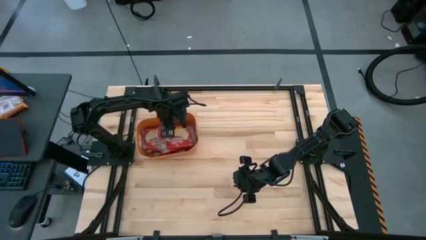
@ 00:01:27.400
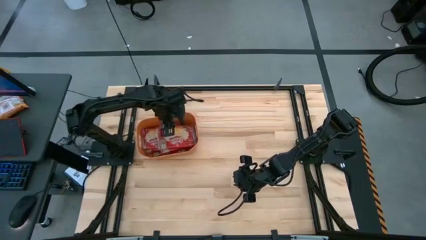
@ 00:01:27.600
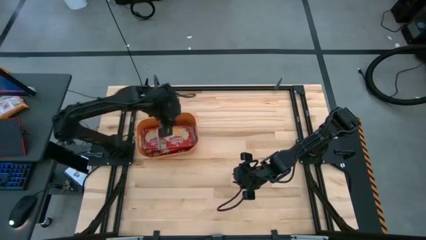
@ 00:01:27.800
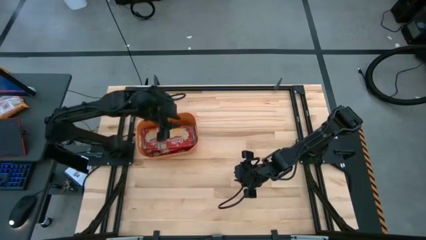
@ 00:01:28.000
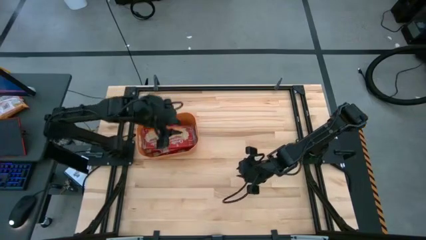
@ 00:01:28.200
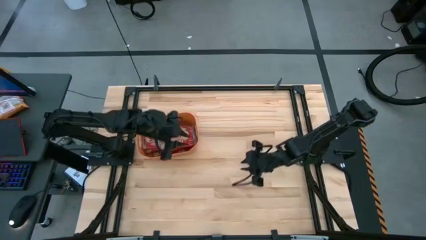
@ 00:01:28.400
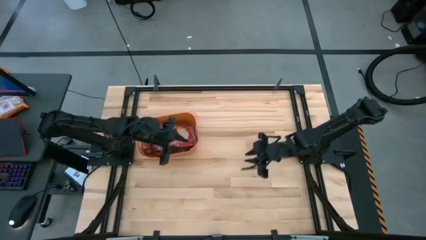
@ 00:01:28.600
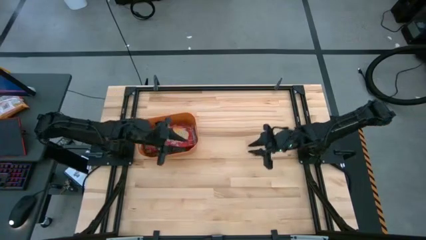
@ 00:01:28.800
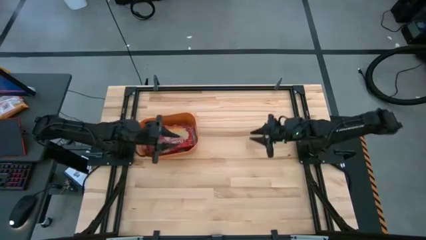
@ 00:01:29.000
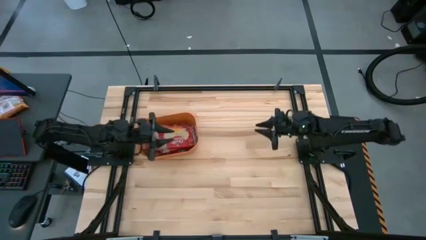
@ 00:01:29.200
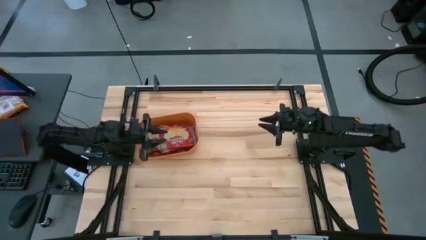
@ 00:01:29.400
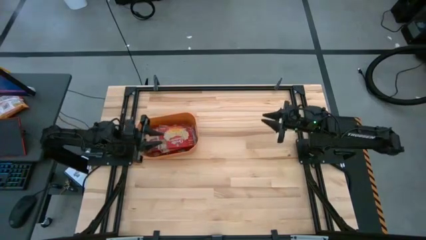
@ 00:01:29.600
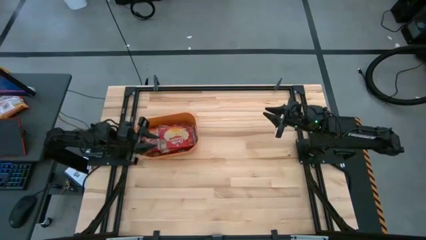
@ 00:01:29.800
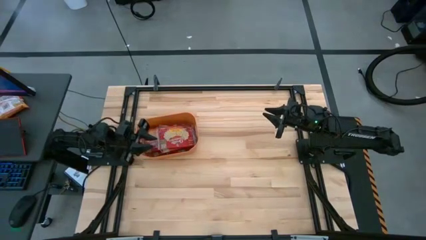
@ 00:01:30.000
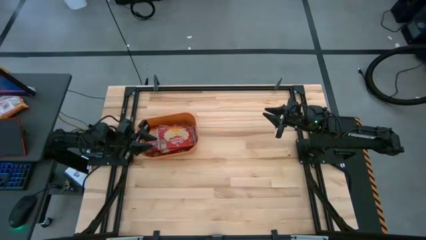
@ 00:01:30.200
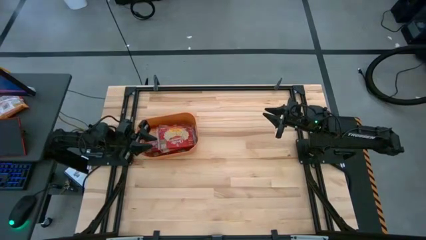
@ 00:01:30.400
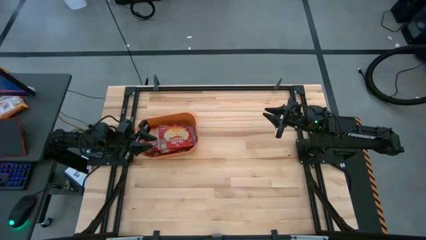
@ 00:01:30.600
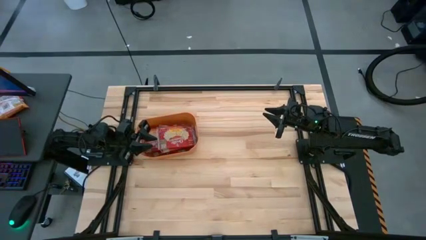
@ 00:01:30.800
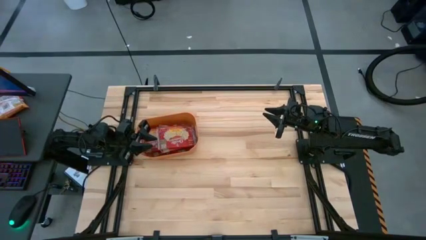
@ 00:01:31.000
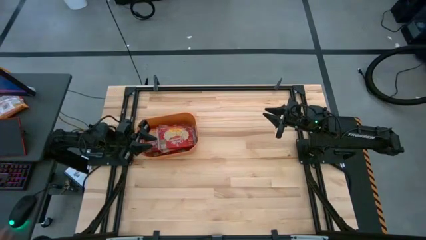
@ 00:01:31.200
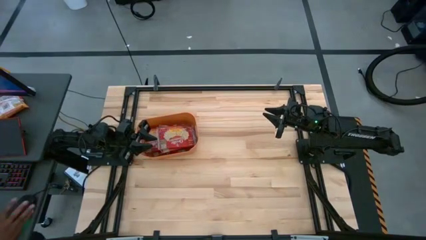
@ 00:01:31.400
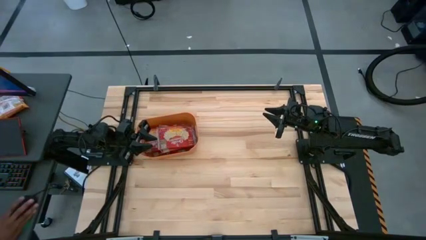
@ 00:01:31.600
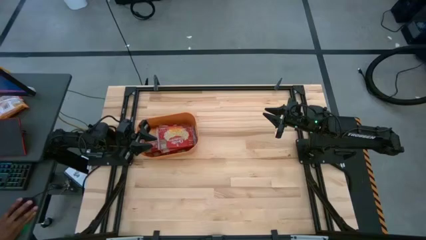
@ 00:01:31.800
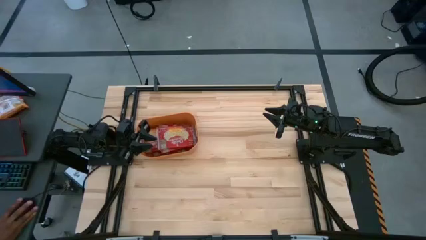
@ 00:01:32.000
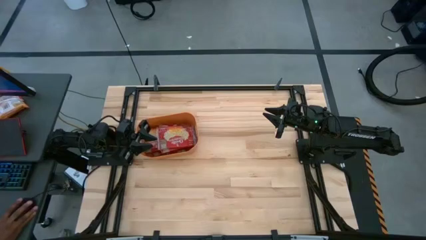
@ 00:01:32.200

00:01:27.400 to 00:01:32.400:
Task: Sort popcorn bags into baskets
Return to Home Position

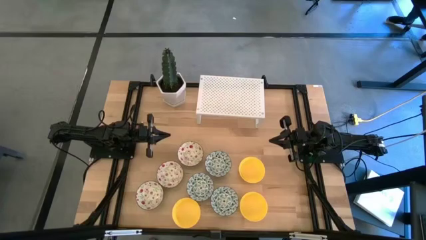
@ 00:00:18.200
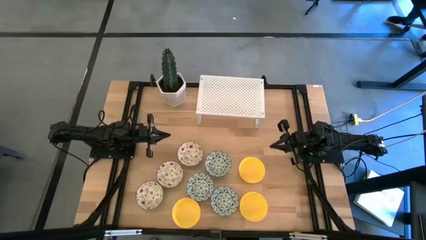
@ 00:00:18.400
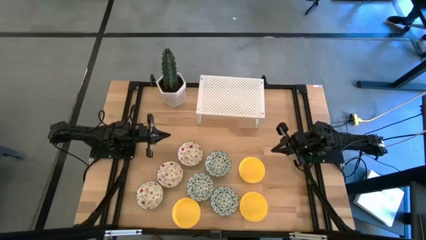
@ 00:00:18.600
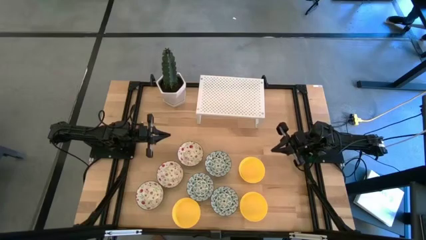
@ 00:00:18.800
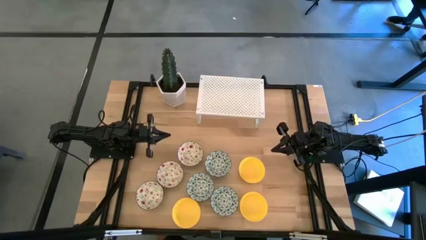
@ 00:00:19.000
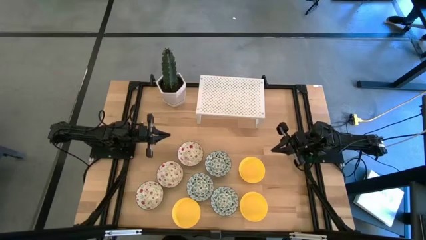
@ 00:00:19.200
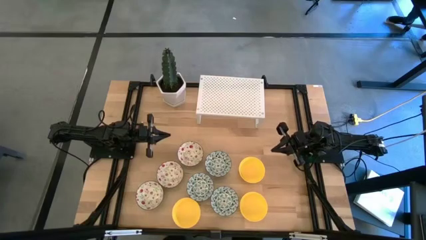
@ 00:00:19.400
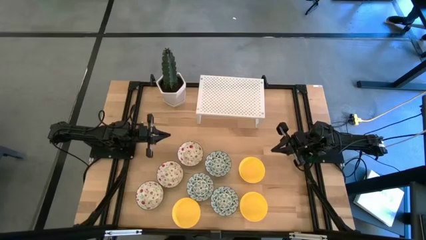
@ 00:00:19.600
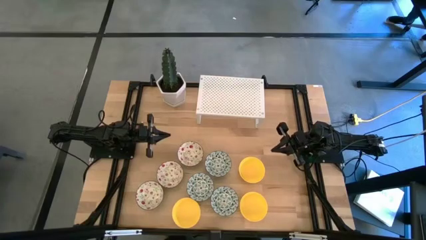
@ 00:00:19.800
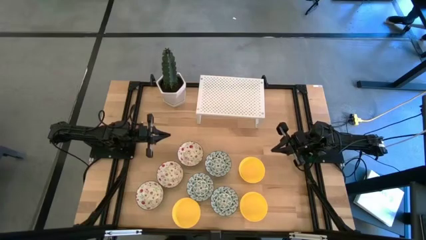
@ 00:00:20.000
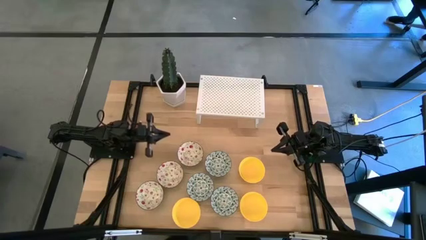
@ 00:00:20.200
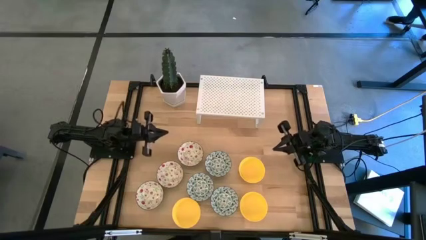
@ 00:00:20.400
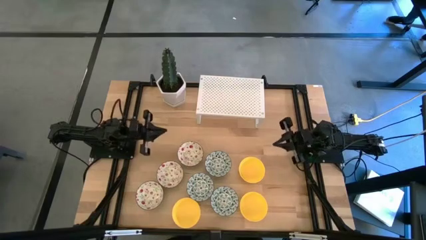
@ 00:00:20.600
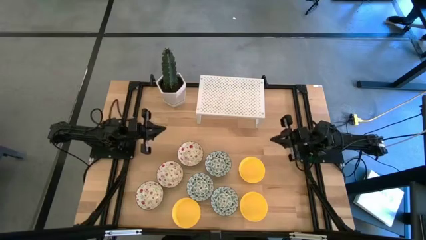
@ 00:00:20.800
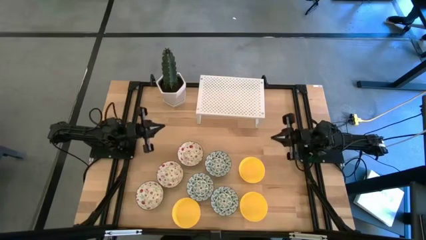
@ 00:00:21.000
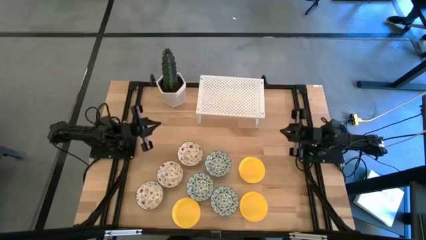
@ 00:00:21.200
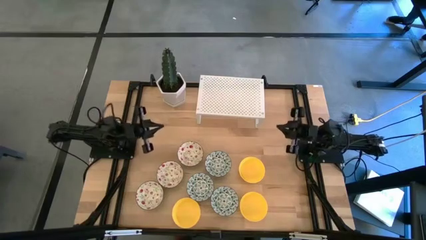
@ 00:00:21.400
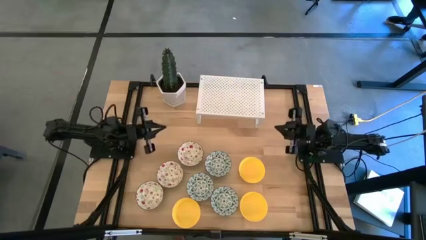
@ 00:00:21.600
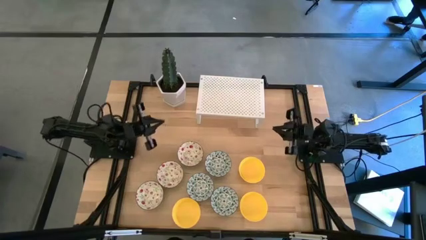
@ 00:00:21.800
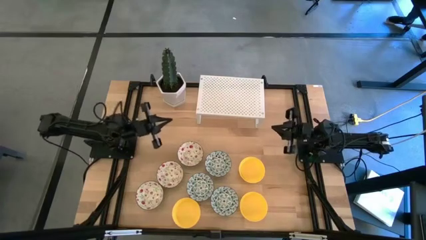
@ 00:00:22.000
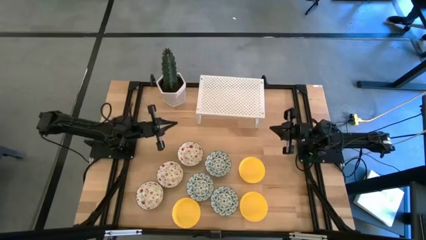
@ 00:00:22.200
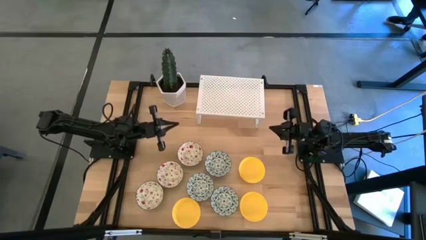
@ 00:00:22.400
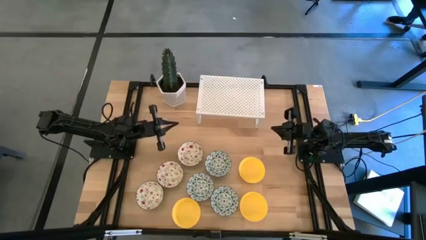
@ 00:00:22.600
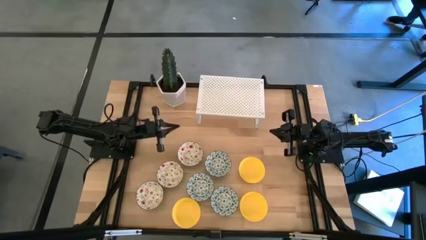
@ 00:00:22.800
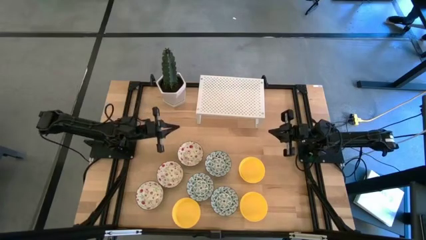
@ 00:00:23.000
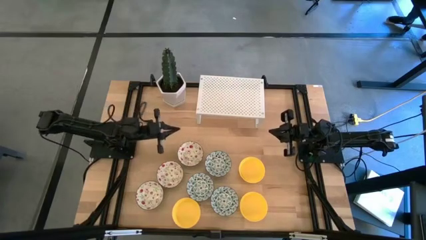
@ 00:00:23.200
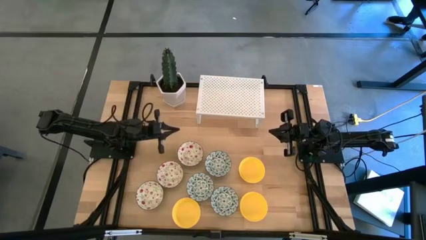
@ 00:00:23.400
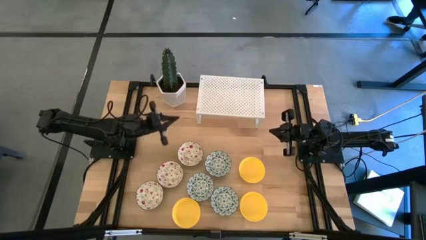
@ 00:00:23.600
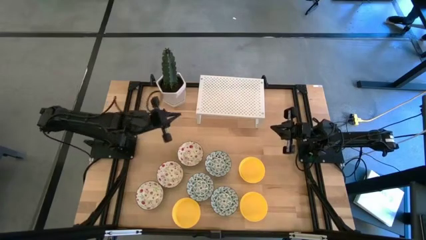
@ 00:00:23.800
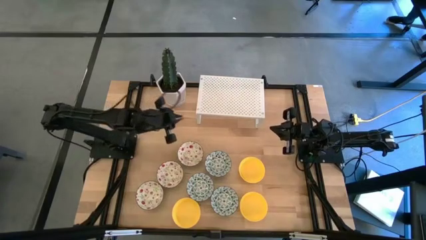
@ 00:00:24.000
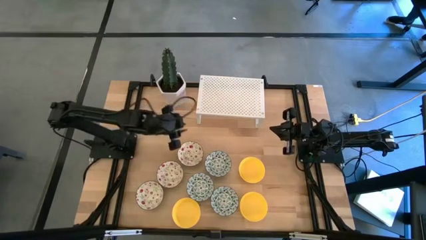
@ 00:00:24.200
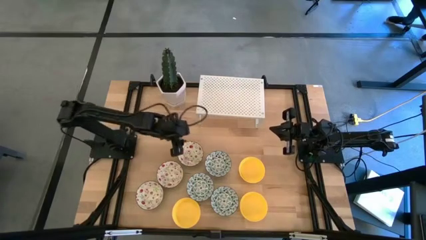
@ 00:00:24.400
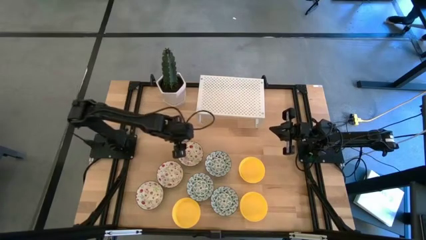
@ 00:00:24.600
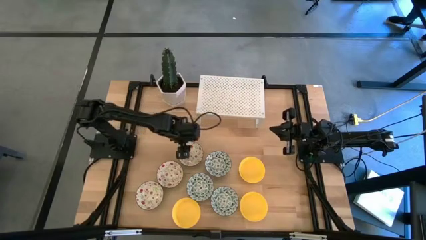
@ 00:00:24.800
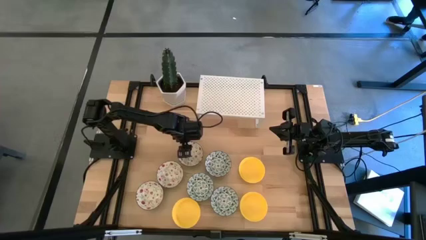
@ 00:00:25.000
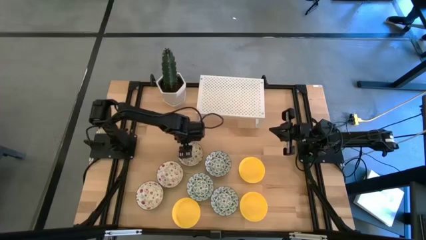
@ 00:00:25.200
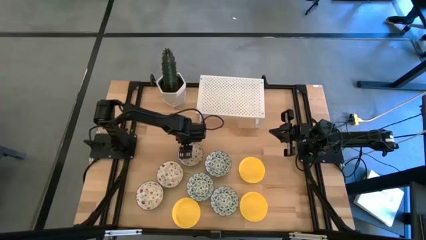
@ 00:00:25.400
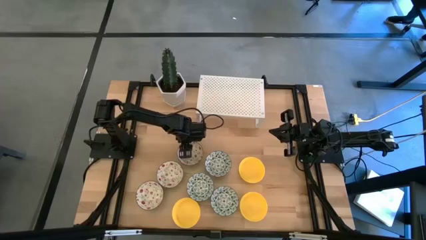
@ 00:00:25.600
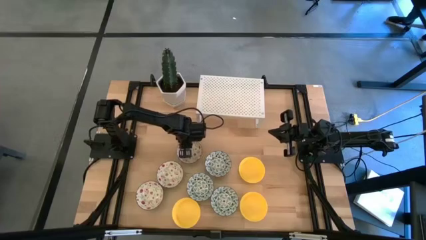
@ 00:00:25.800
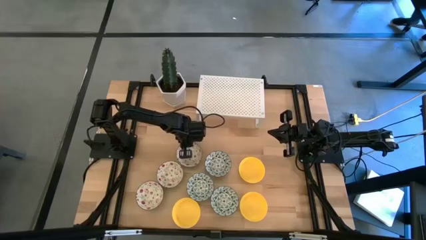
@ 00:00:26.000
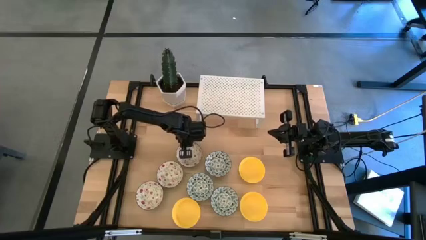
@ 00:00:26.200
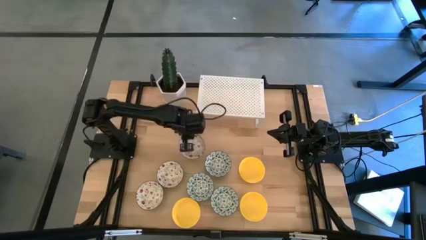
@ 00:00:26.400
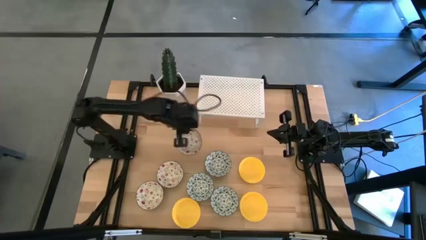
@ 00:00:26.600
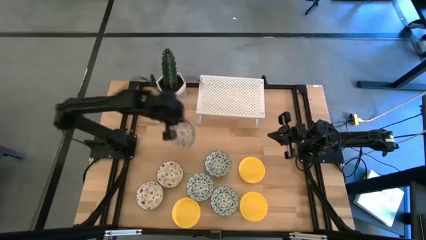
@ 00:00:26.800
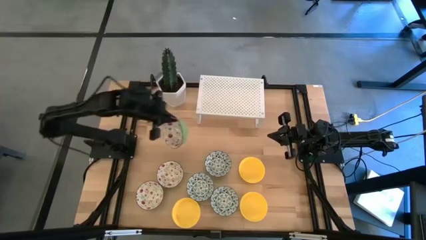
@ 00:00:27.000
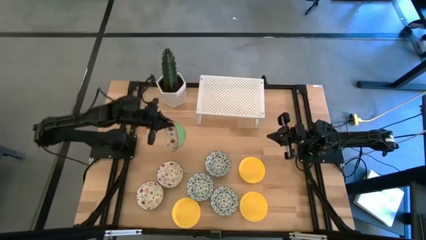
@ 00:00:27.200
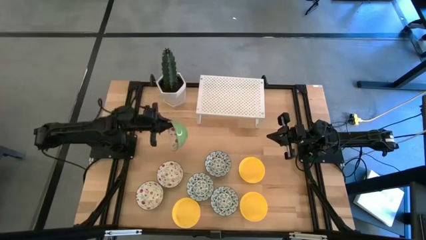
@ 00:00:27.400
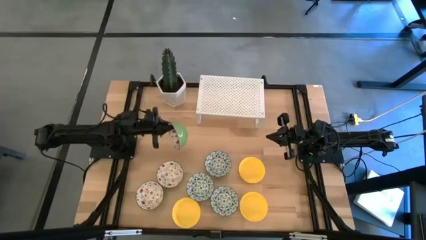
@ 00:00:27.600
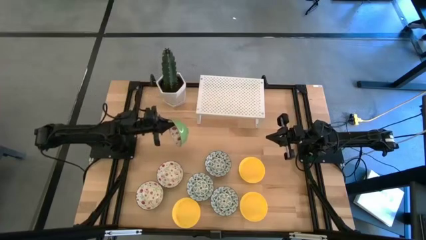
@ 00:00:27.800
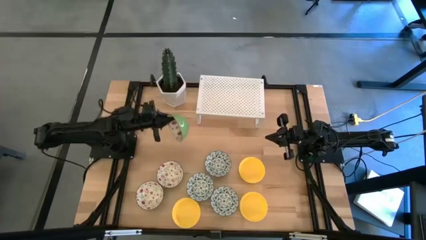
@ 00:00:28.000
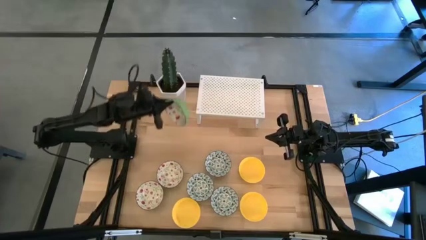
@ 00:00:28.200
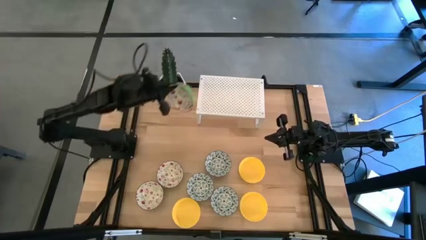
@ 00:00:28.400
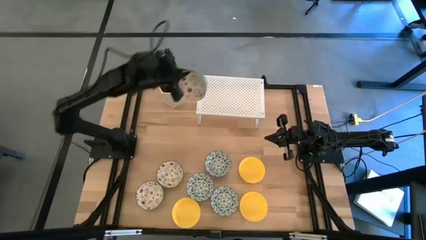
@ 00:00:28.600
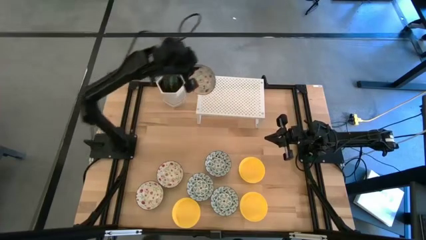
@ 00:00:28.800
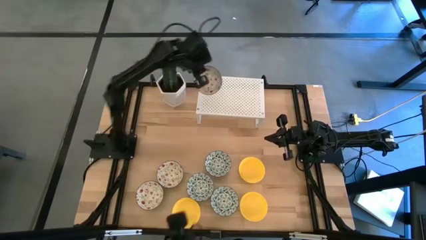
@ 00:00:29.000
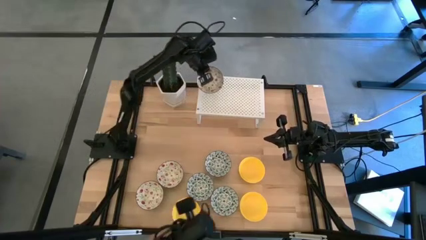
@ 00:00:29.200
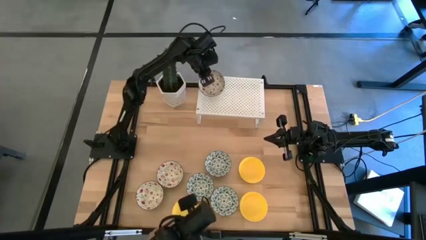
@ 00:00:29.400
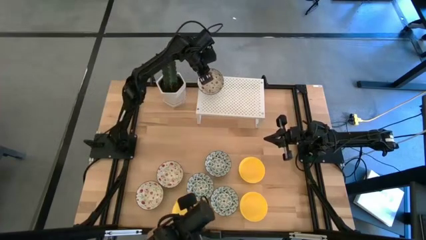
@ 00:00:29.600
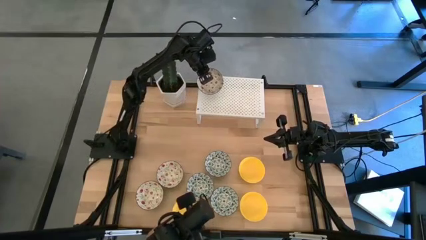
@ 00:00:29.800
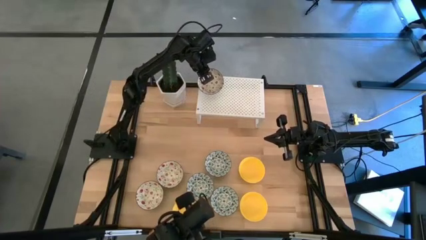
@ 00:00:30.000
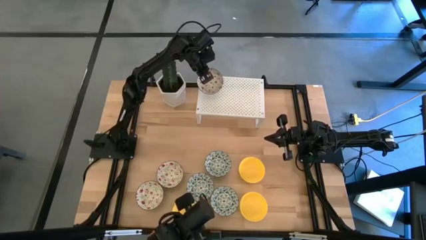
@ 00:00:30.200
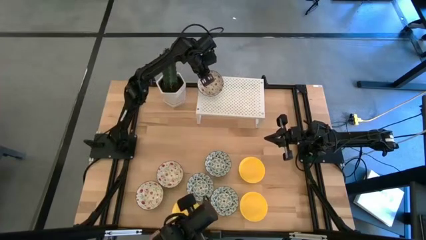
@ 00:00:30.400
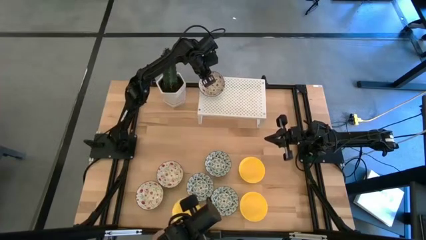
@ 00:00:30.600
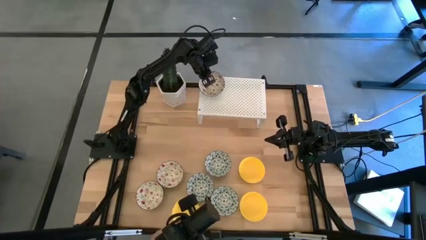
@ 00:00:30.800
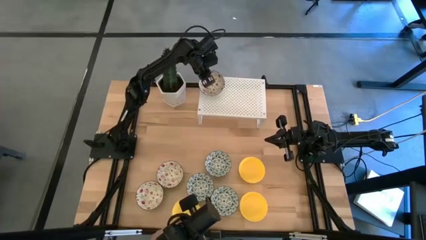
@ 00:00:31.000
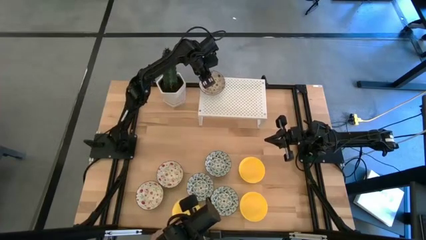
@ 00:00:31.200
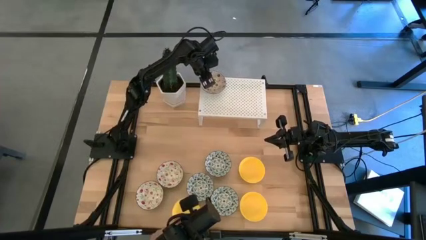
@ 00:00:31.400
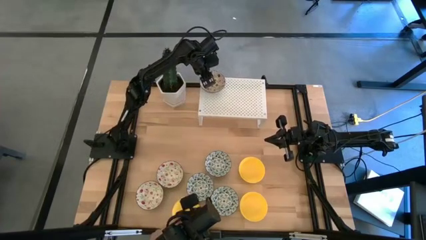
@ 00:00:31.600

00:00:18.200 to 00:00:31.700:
Task: Pick & Place Mini bowls
Put the top red patterned bowl on the shelf
